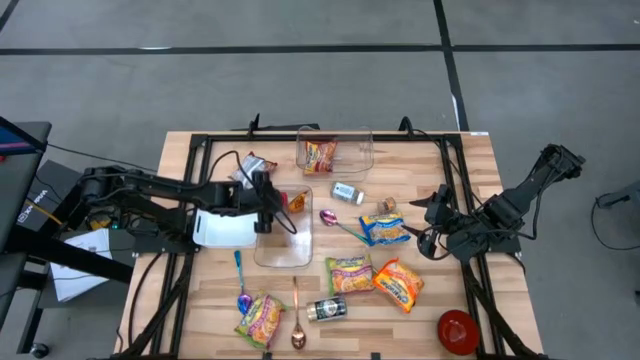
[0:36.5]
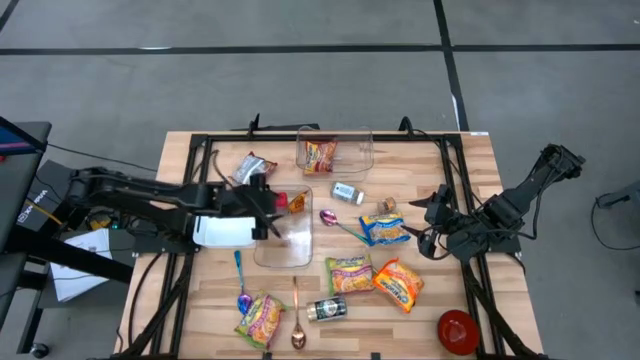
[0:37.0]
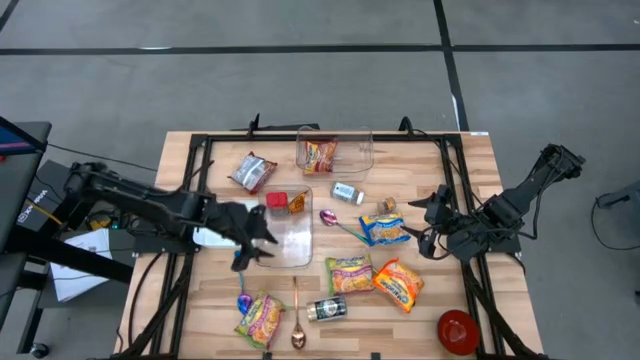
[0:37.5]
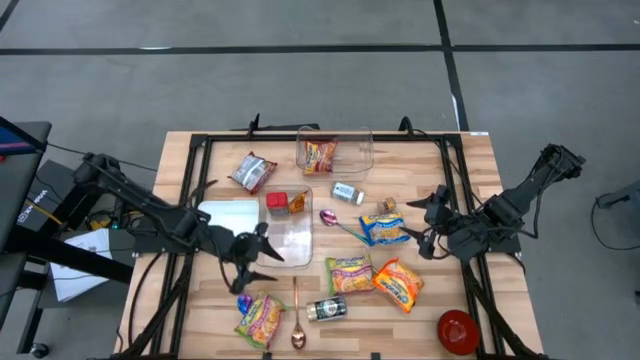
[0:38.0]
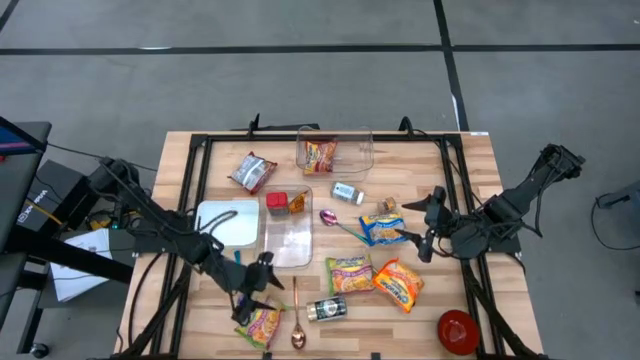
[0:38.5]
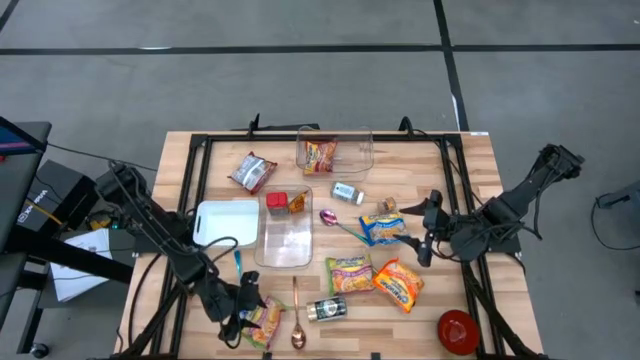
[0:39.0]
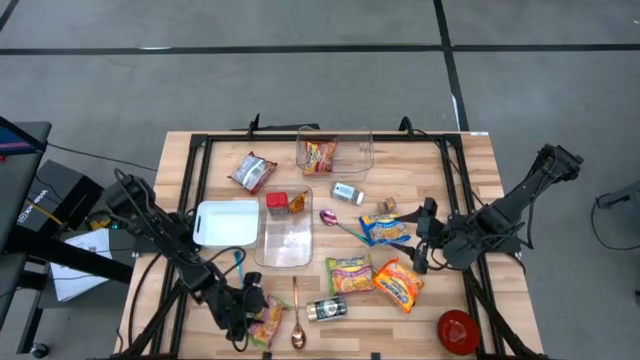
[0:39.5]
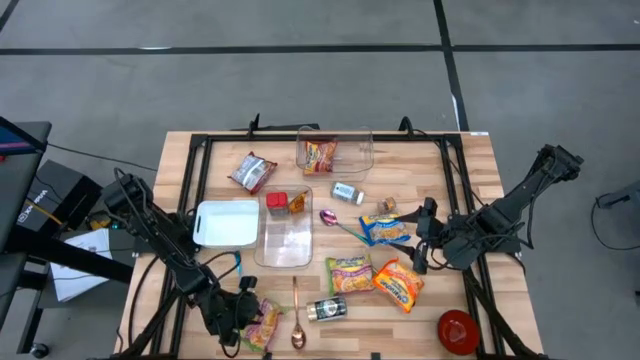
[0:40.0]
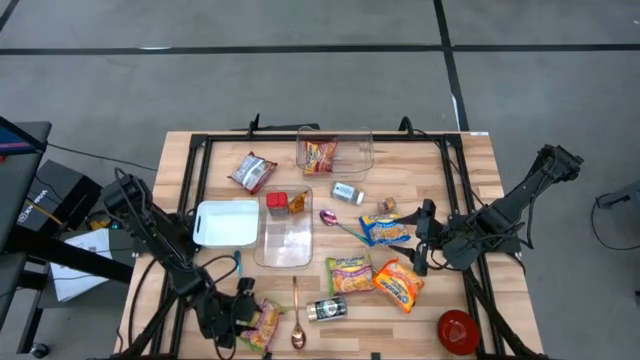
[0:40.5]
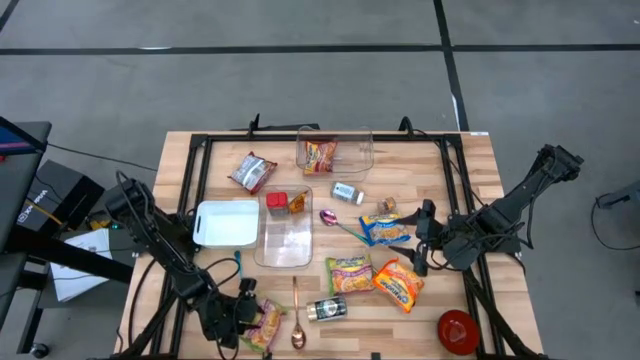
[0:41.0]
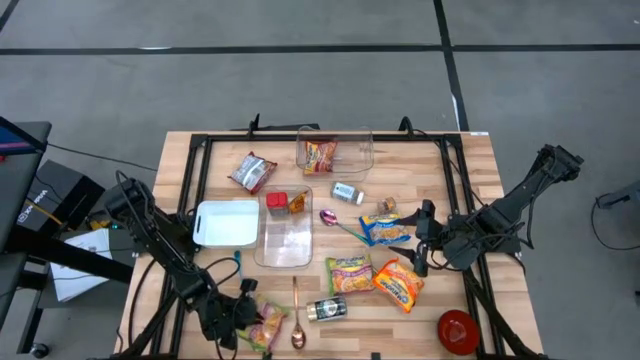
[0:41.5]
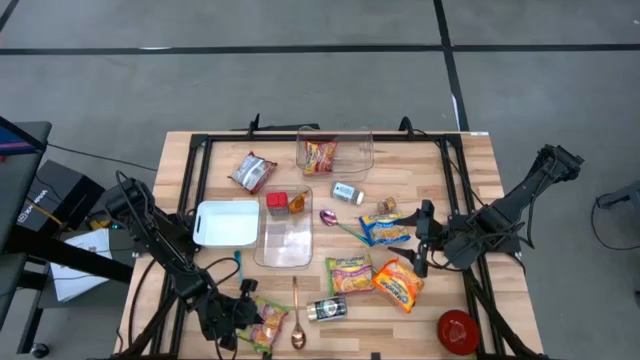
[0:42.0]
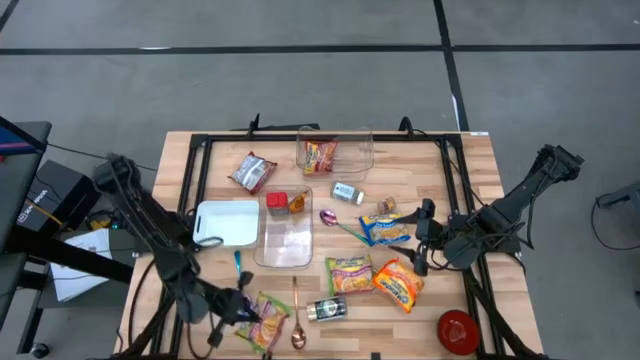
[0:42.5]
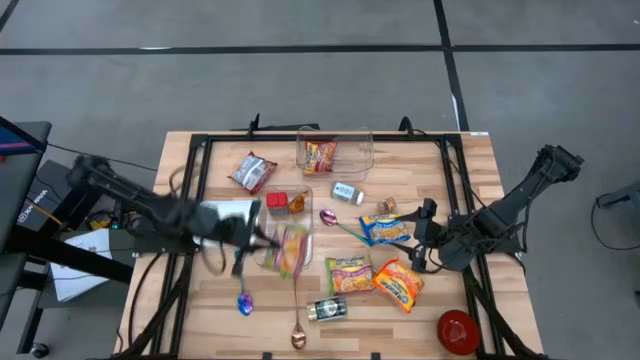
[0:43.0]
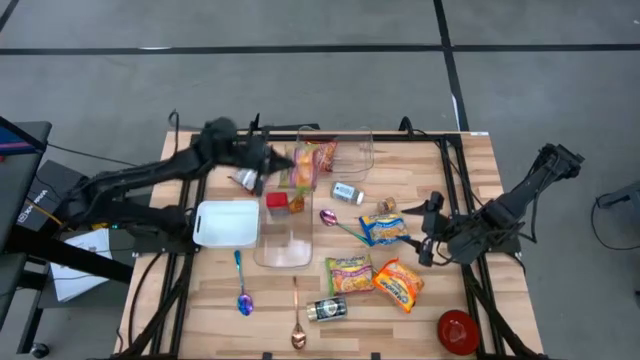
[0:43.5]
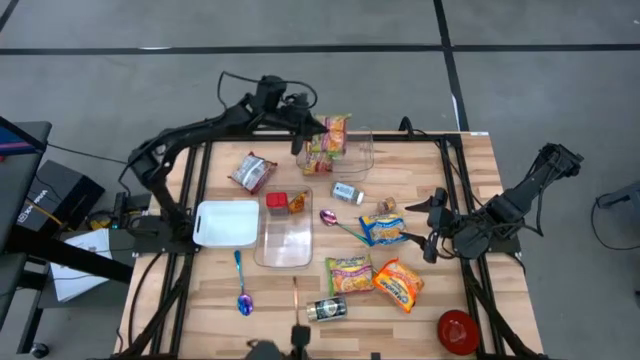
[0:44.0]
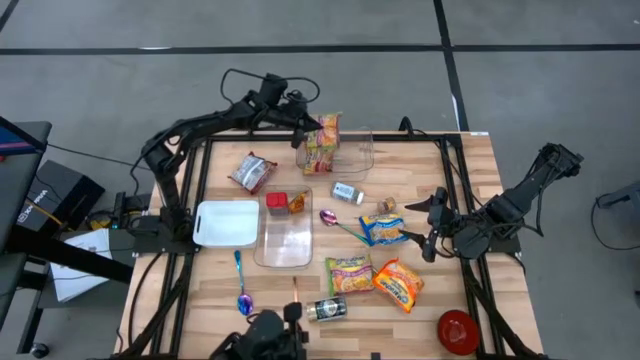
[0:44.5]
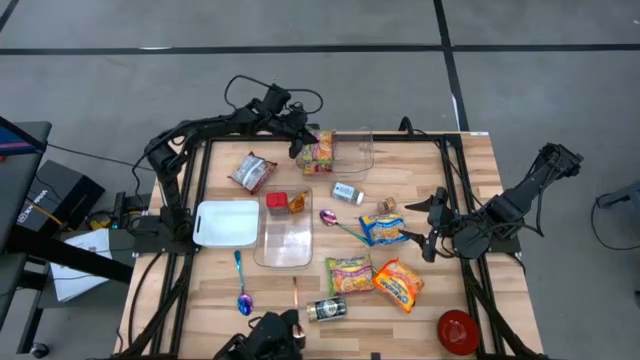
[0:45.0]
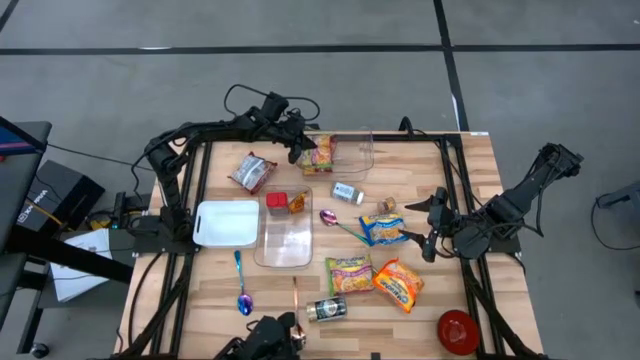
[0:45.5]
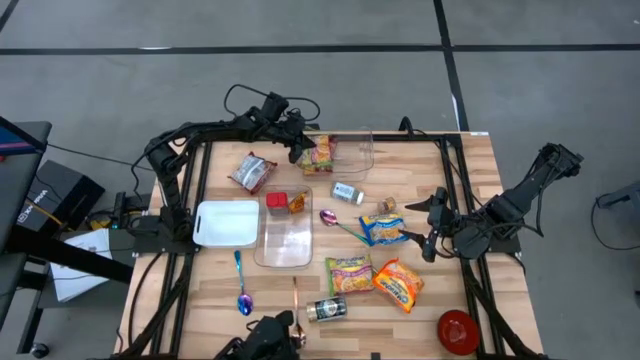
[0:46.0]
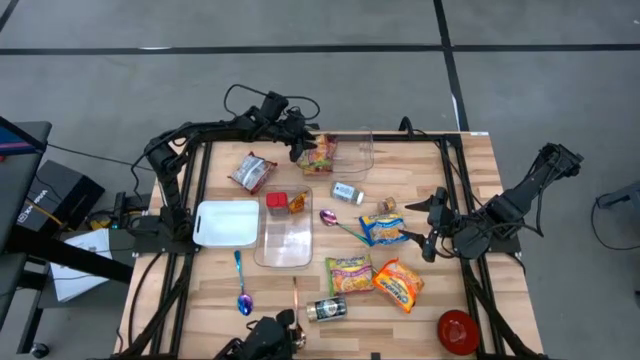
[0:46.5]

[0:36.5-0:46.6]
Task: Pick & Place Food Item
Put the left green noodle pack into the top transparent bin

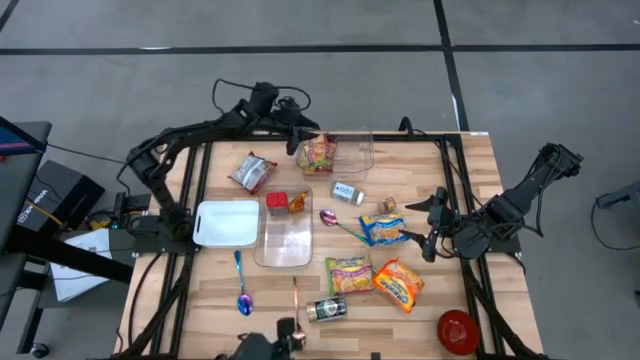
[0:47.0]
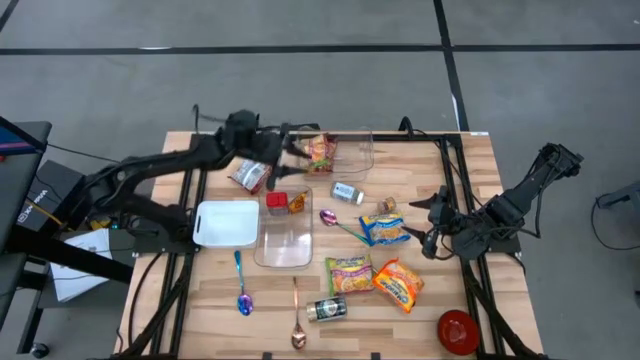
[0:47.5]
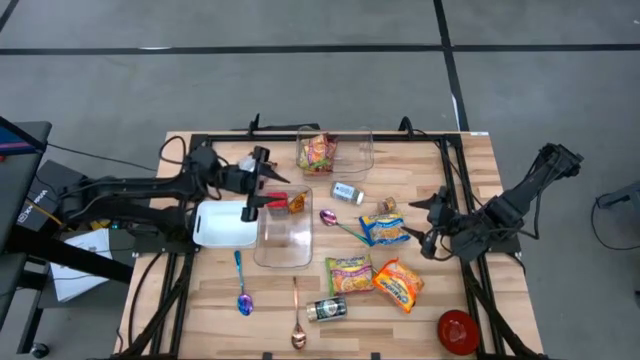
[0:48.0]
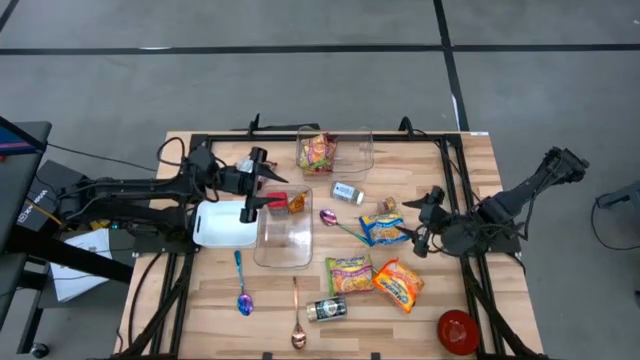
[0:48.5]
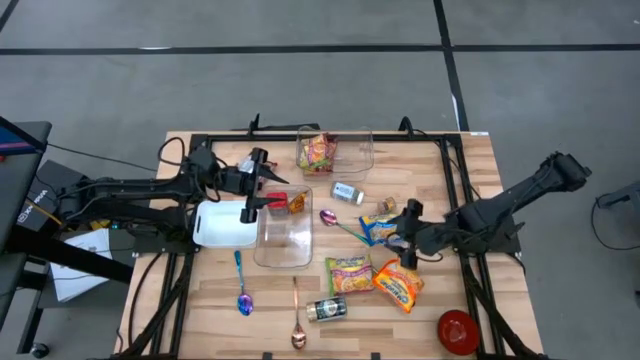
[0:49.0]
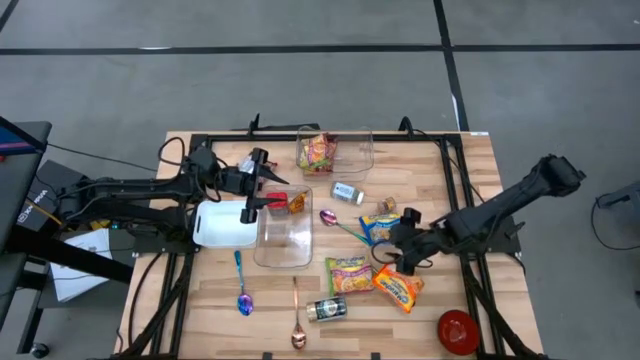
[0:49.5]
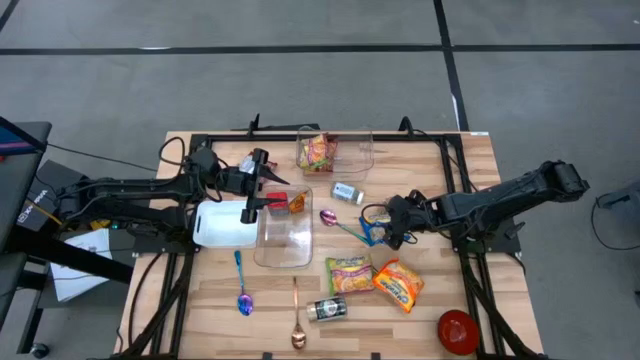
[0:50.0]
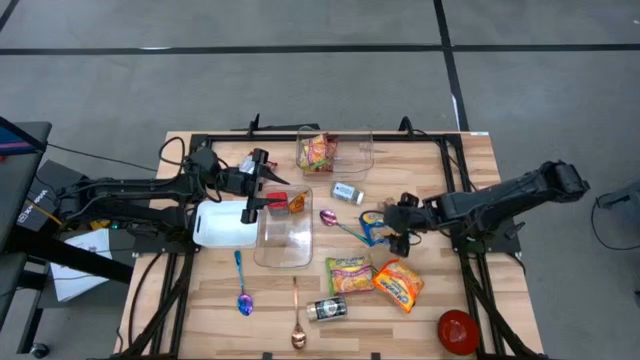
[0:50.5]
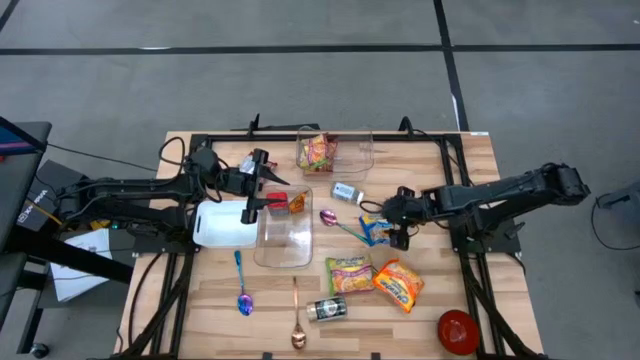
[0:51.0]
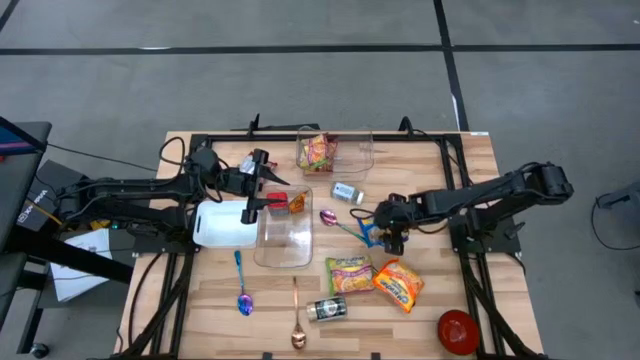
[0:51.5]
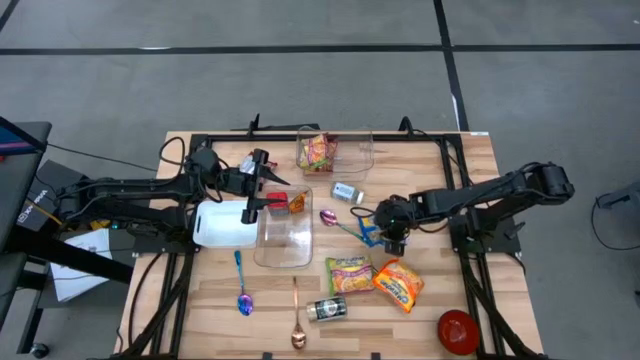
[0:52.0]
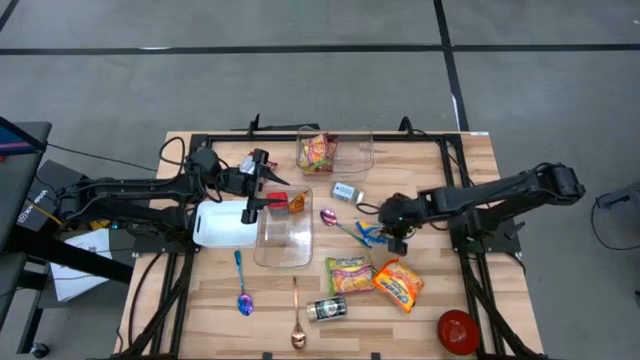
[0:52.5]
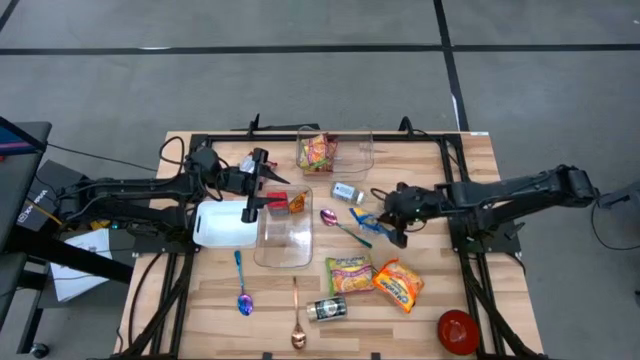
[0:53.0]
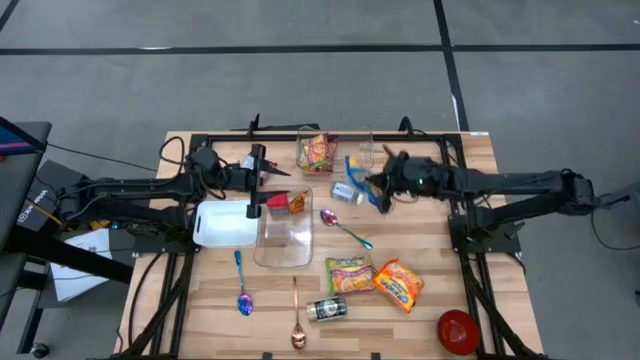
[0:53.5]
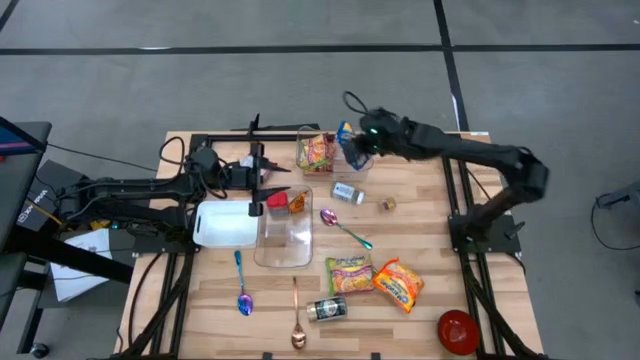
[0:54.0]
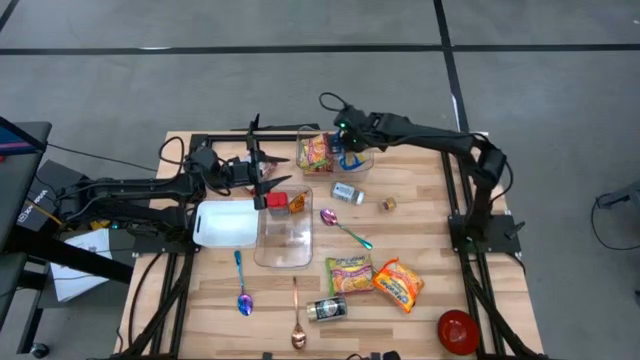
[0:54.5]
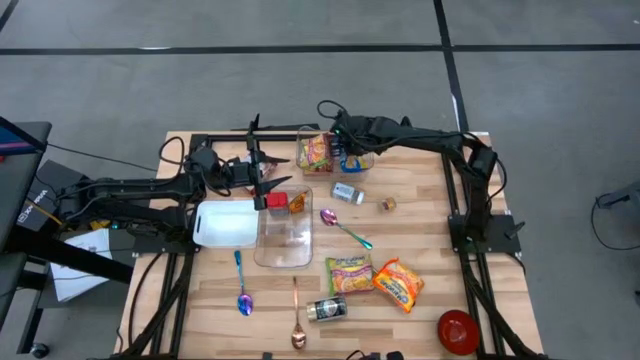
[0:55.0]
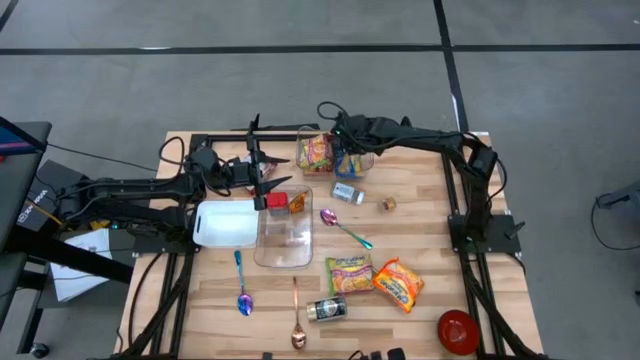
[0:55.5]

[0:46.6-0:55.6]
Put the blue noodle pack into the top transparent bin

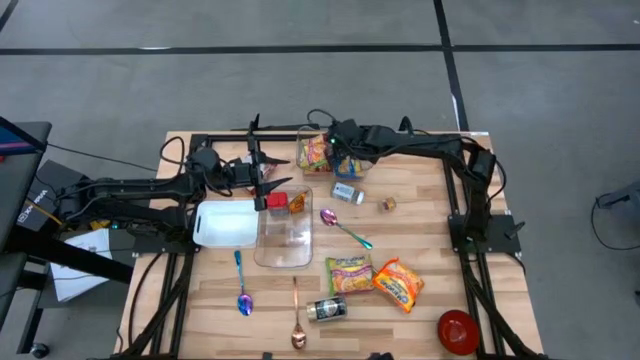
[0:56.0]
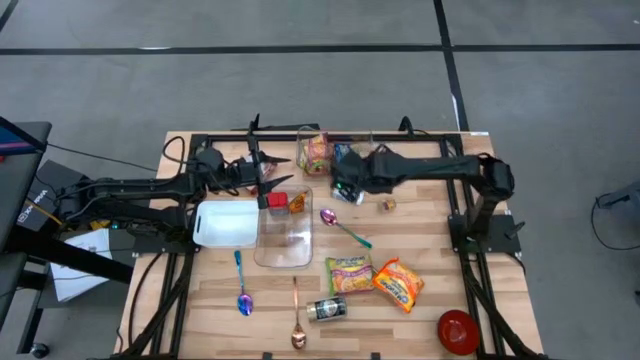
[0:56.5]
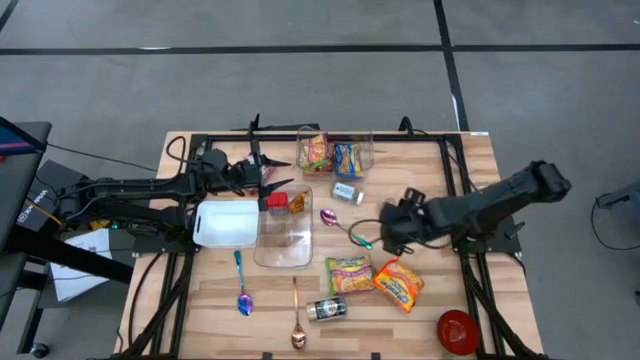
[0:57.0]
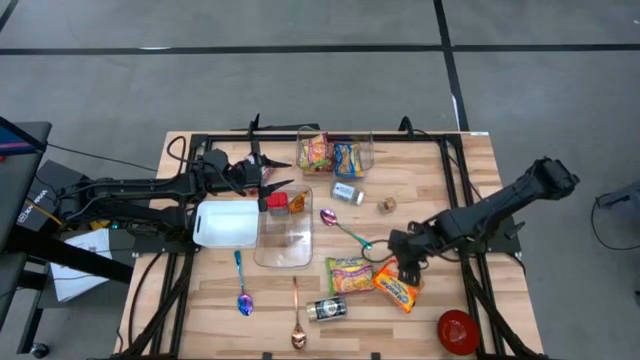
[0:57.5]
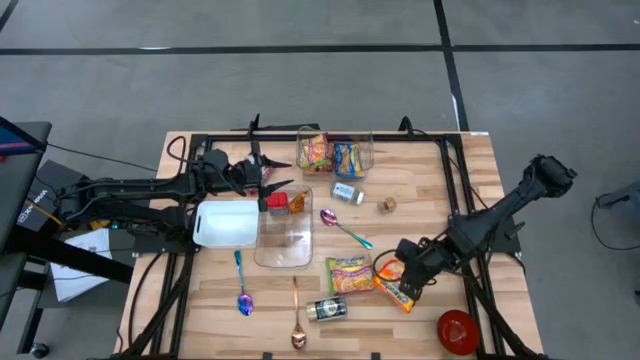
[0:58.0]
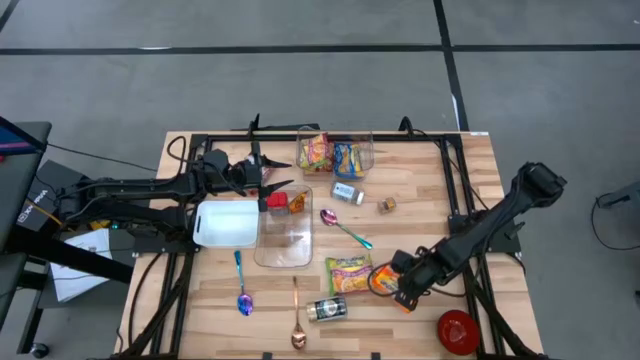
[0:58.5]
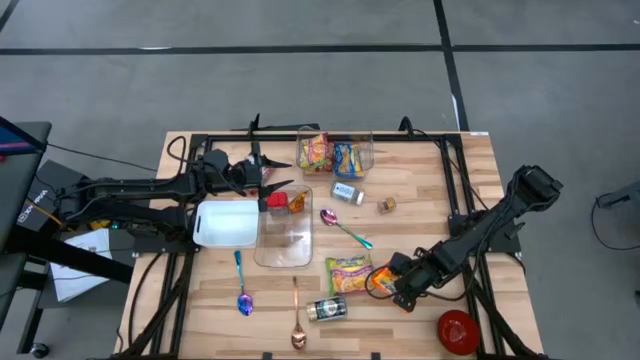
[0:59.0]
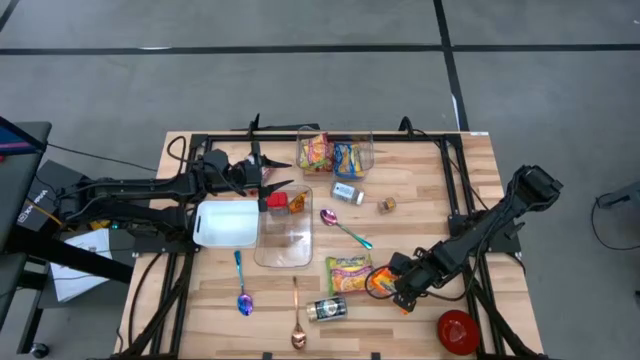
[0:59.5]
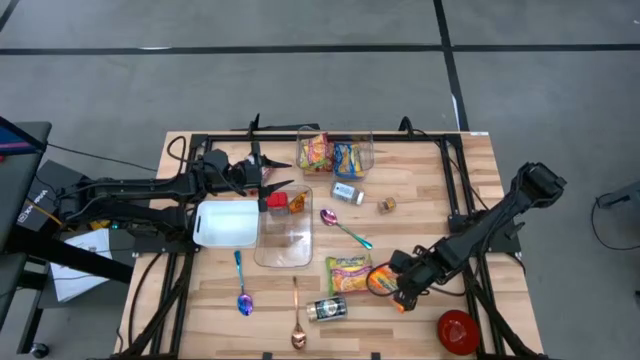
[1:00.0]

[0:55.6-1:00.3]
Put the orange noodle pack into the top transparent bin
